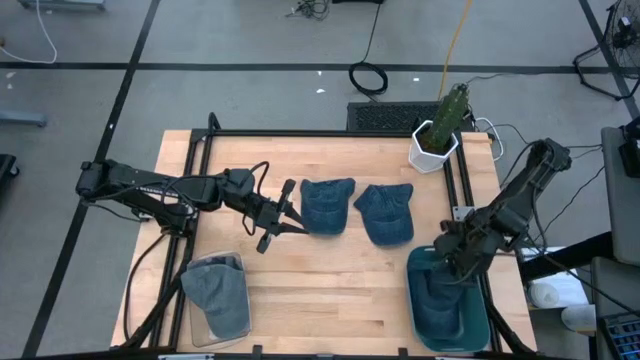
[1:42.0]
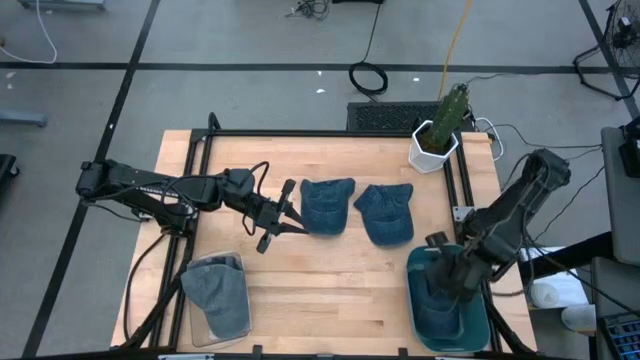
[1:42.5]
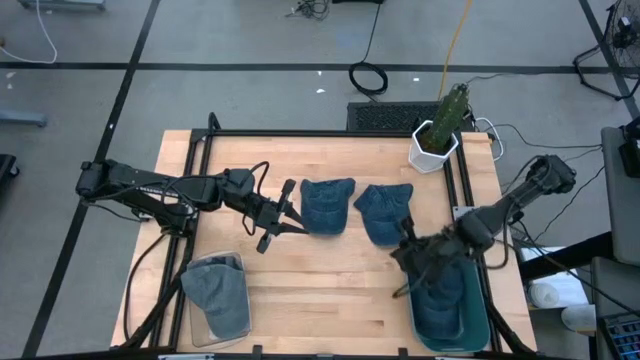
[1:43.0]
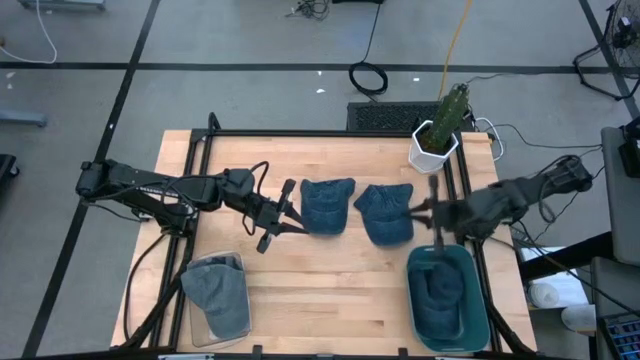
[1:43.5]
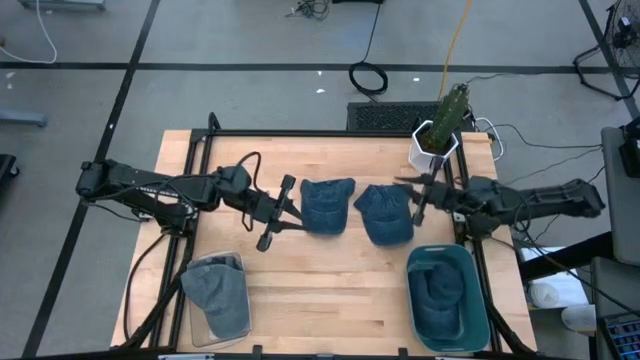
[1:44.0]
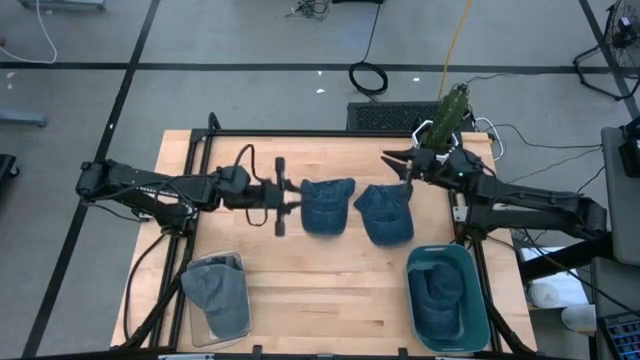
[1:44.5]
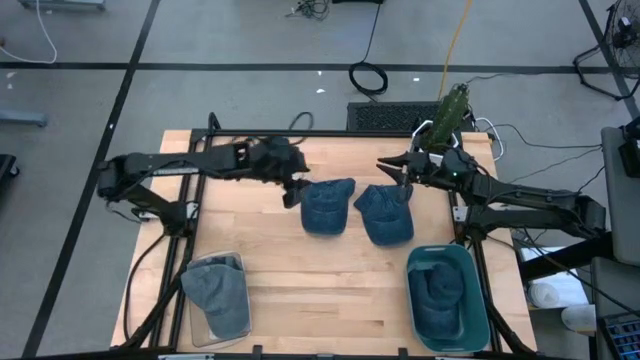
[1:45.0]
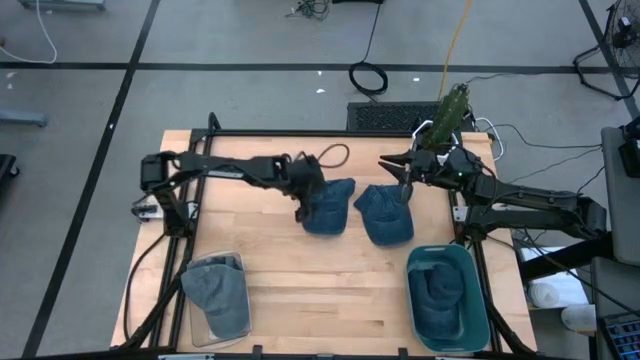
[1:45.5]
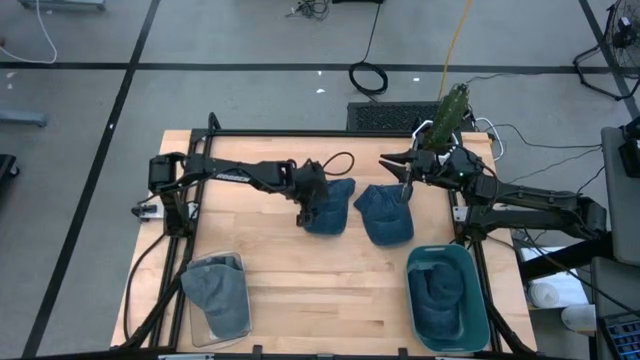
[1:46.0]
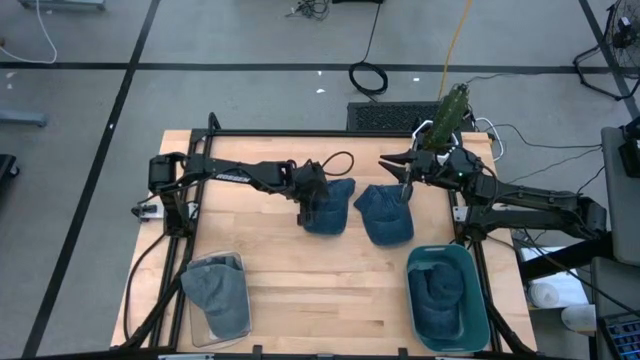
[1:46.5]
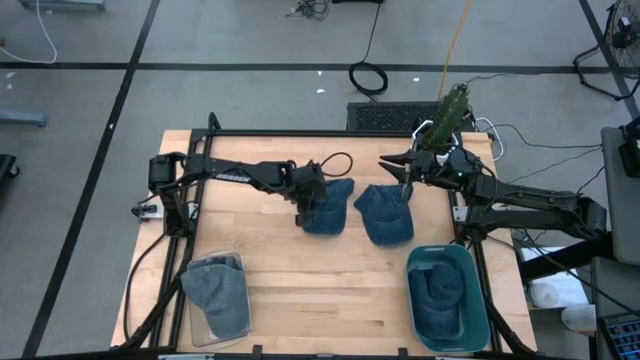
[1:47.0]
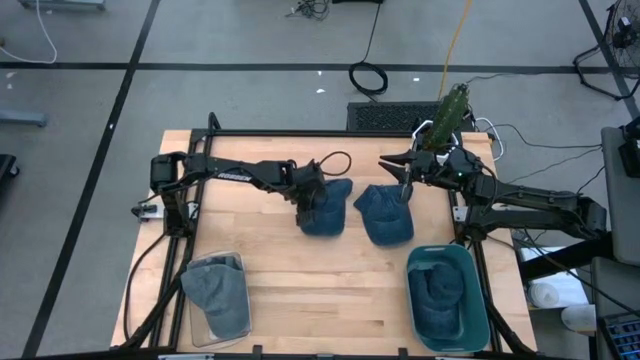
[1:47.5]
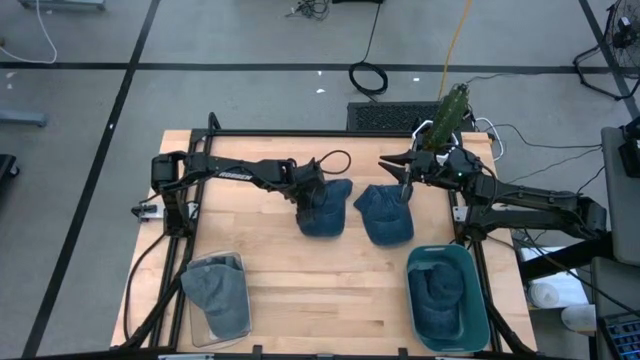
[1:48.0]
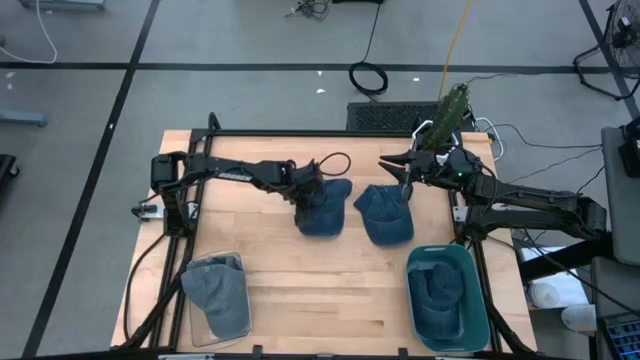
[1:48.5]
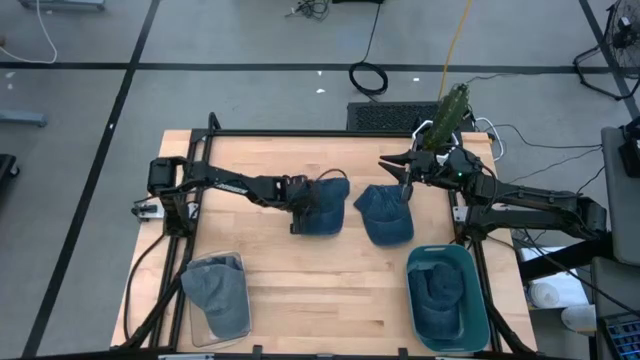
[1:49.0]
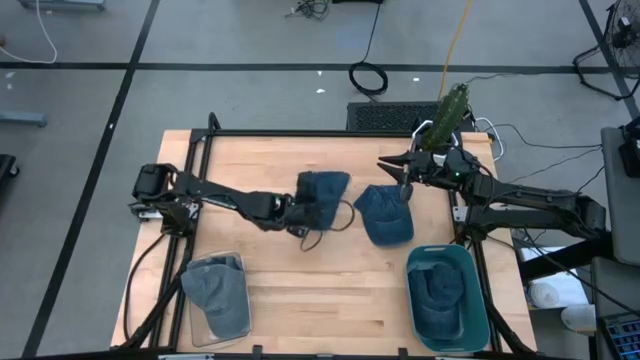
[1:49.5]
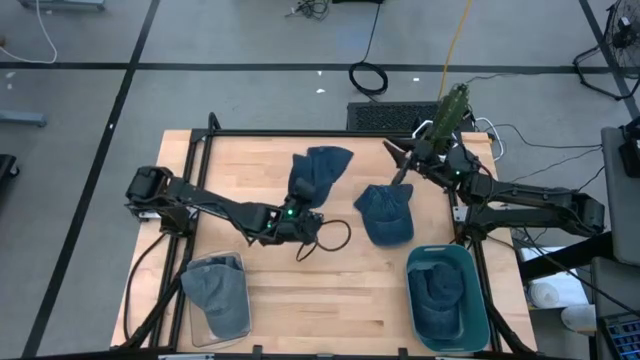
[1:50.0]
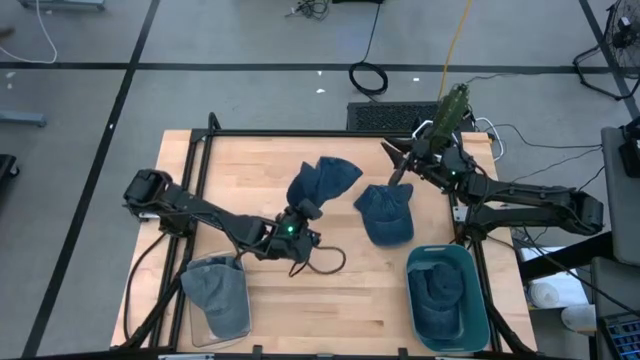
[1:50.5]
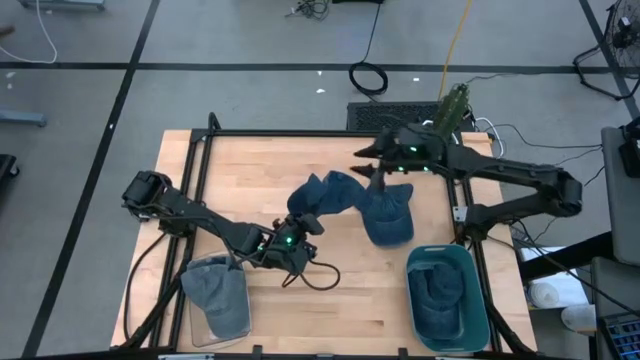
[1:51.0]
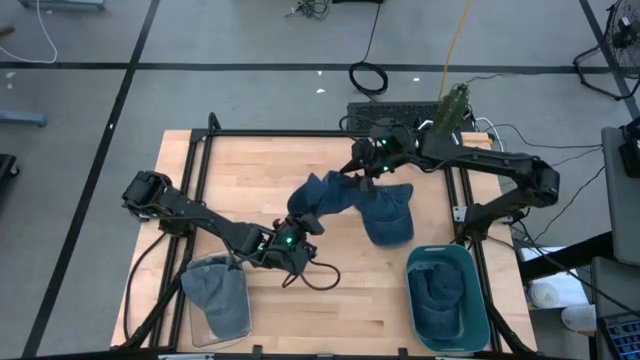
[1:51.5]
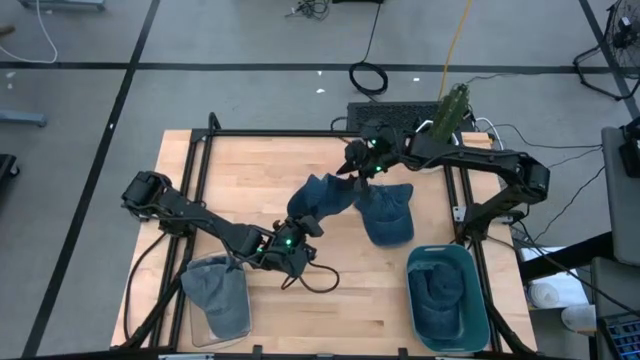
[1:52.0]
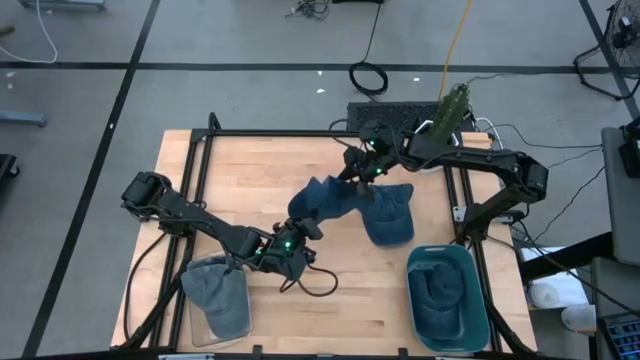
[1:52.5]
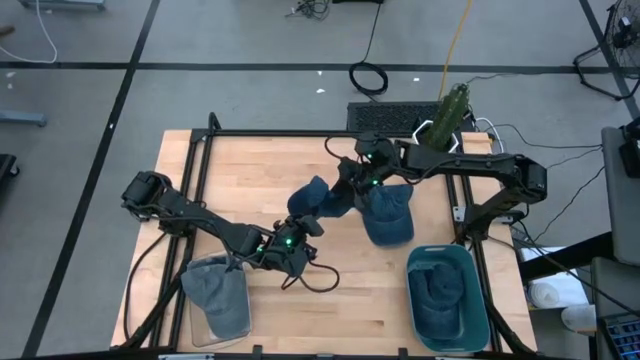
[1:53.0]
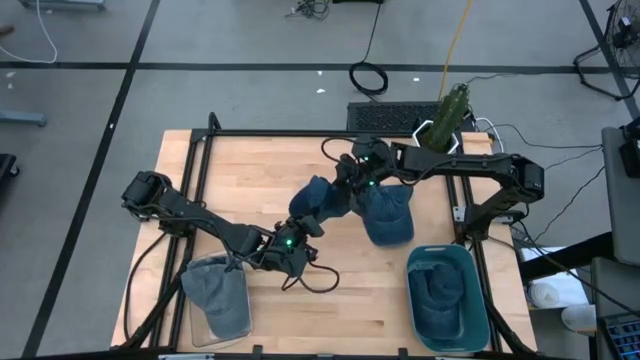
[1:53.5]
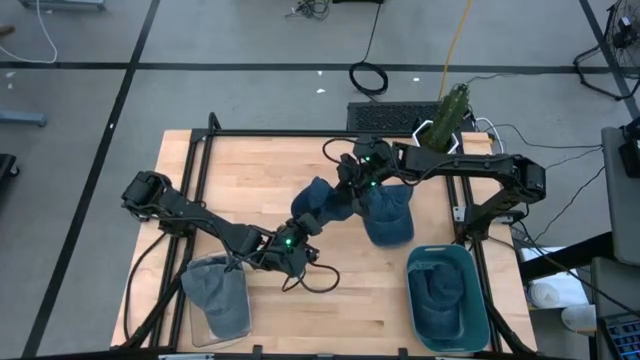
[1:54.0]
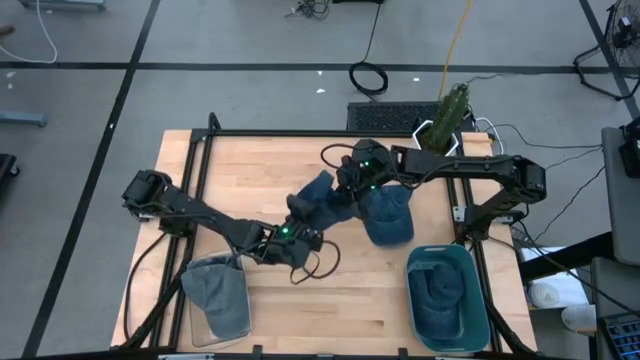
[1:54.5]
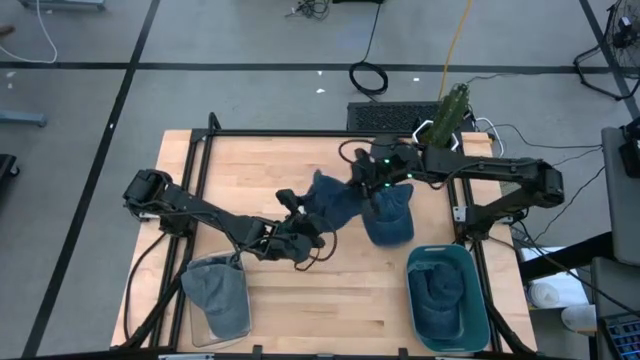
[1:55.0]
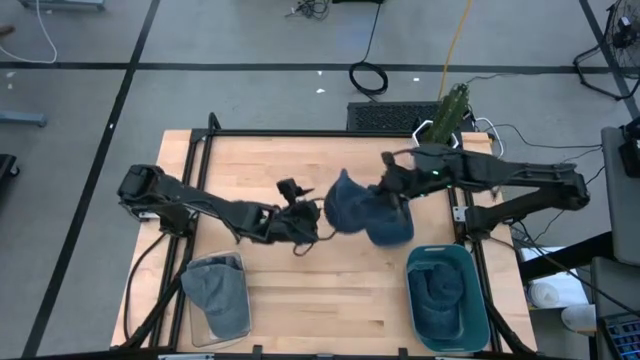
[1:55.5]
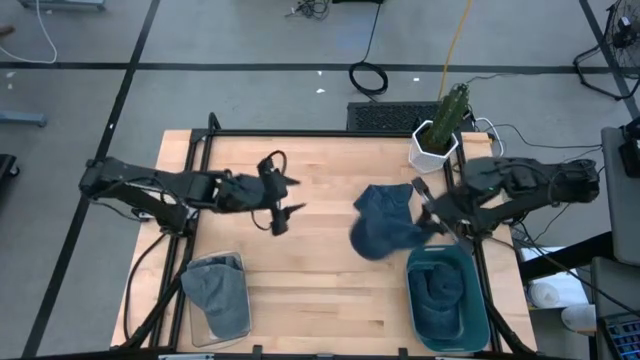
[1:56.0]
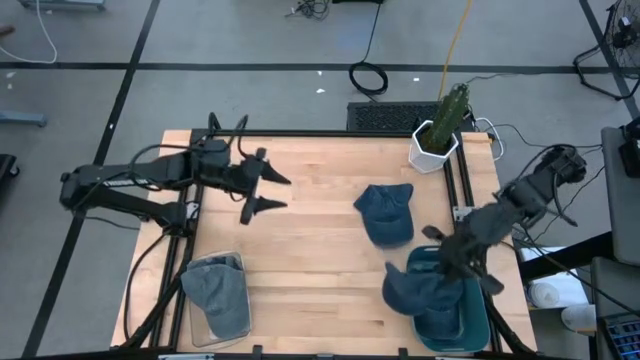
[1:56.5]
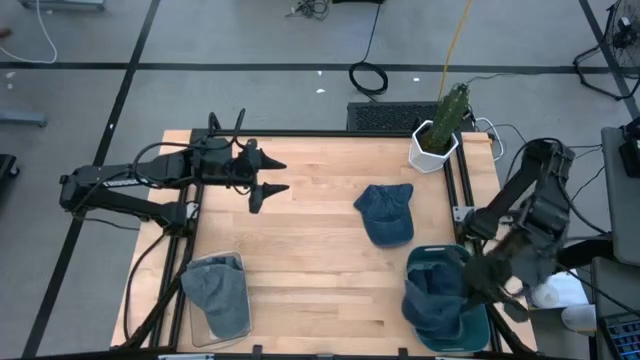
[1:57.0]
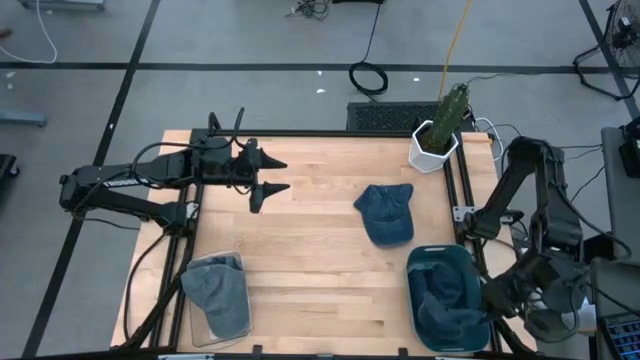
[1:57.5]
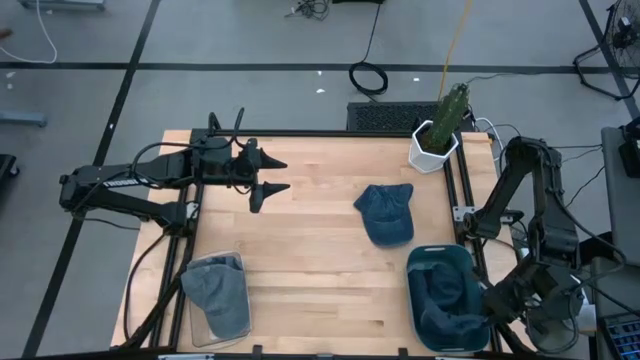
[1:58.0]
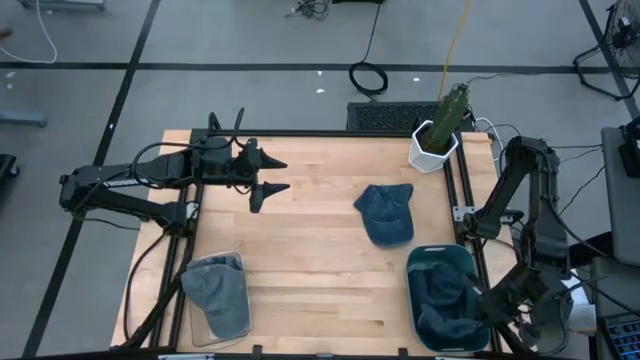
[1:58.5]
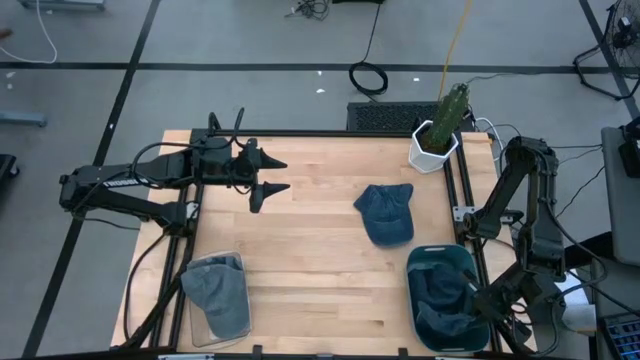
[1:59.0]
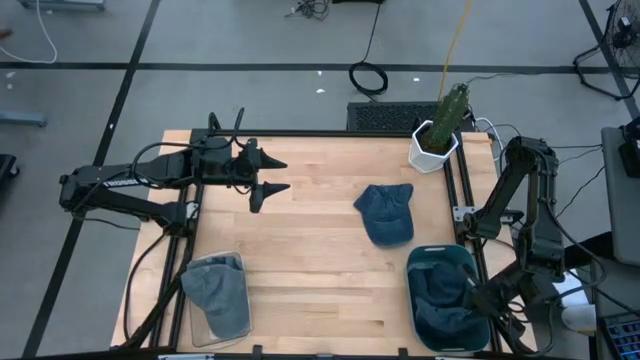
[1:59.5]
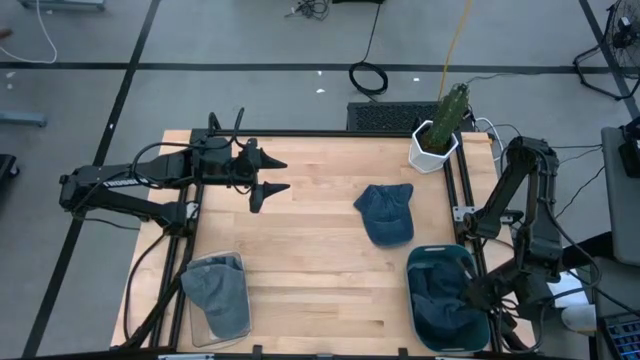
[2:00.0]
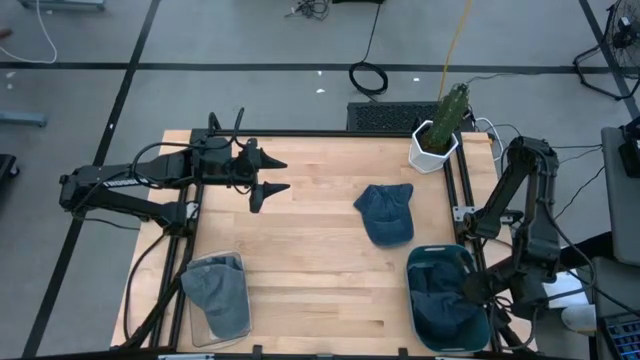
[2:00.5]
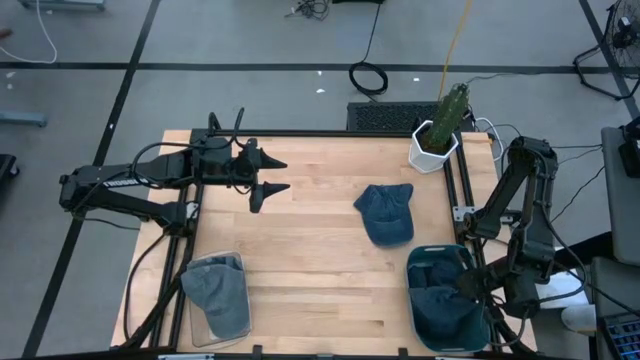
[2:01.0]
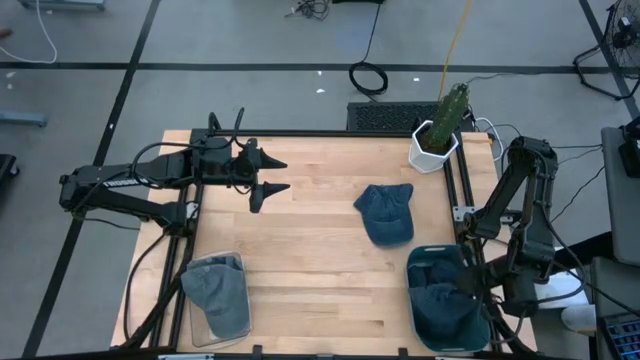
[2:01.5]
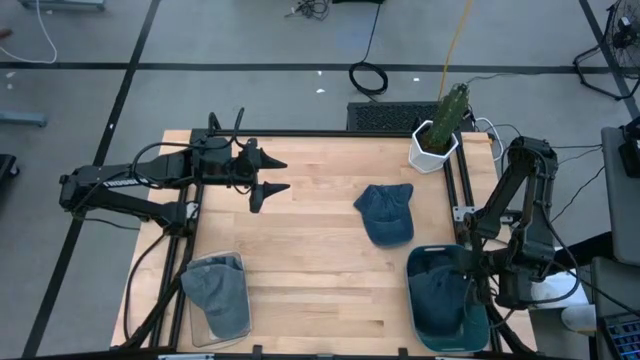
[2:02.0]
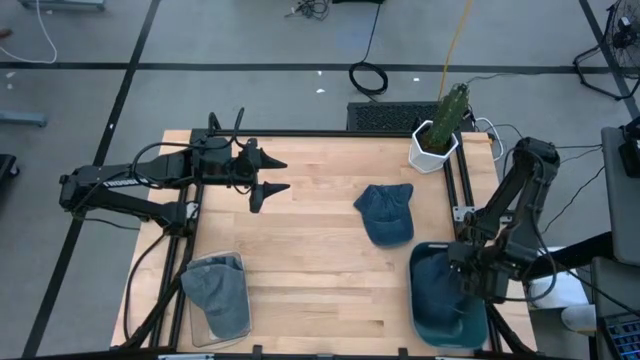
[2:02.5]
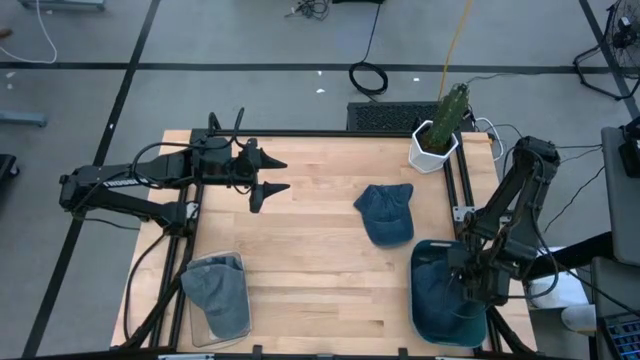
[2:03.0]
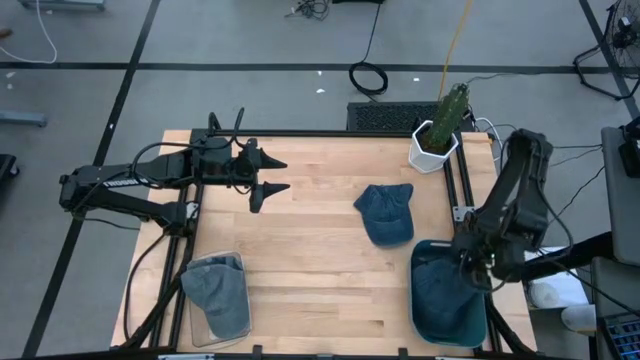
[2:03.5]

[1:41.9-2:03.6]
Task: Pick & Place hat
Put the left blue cap into the blue bin
